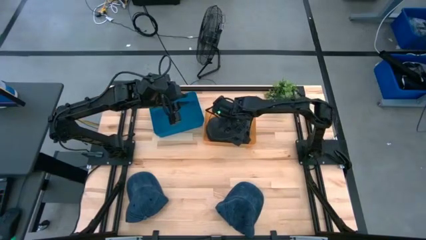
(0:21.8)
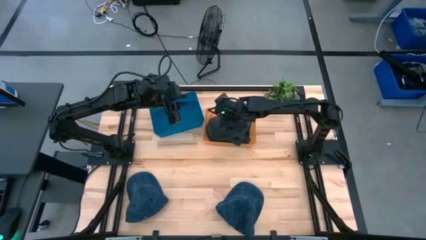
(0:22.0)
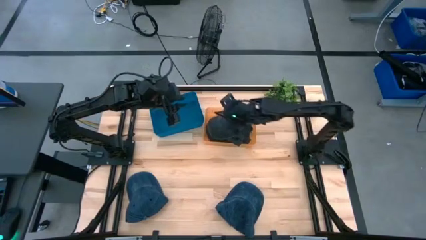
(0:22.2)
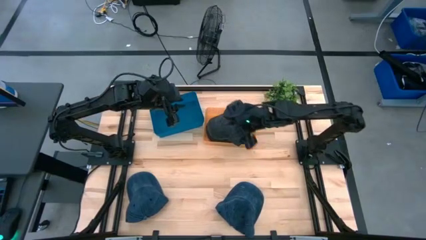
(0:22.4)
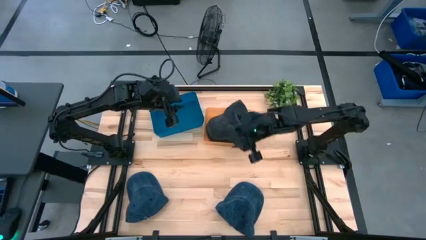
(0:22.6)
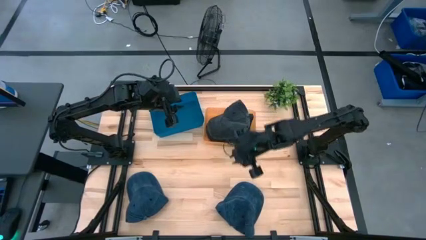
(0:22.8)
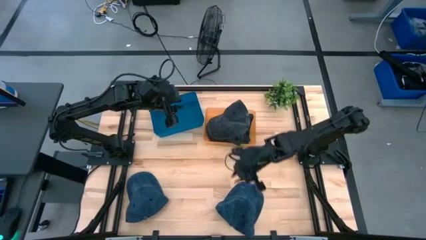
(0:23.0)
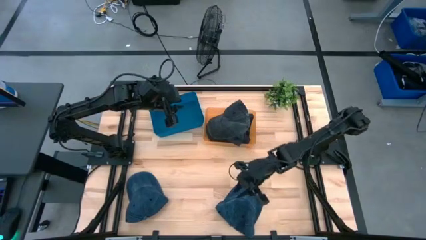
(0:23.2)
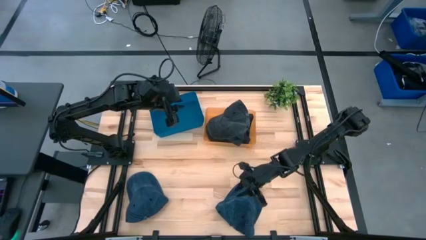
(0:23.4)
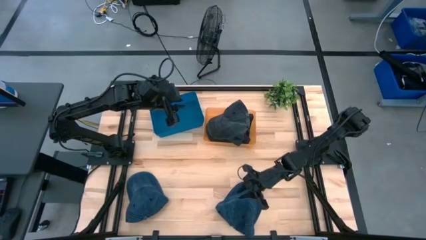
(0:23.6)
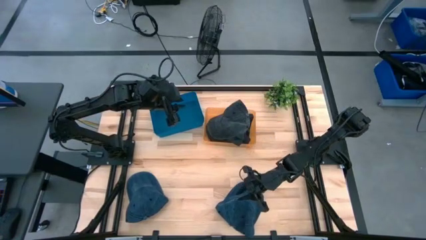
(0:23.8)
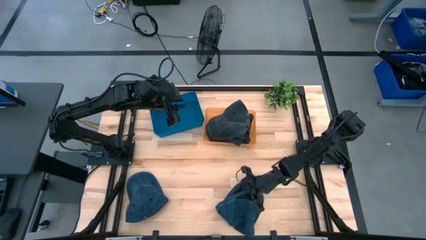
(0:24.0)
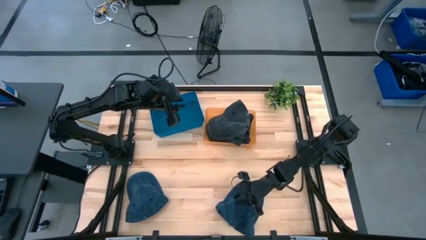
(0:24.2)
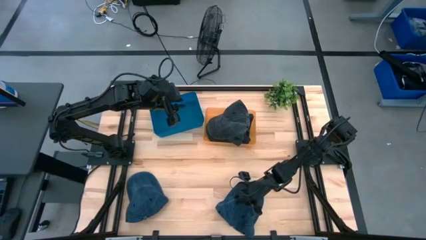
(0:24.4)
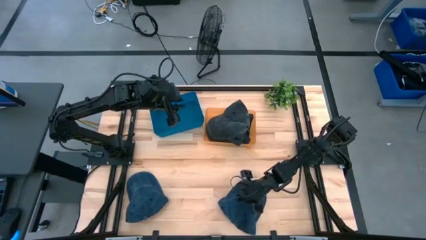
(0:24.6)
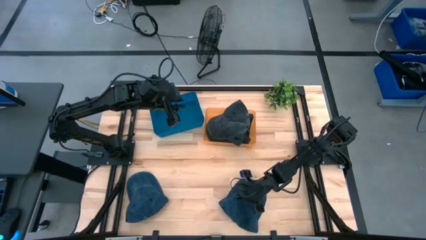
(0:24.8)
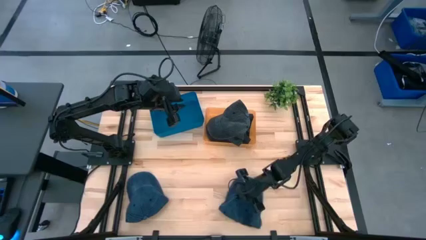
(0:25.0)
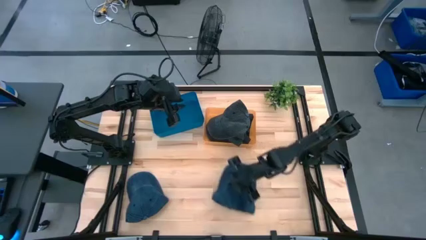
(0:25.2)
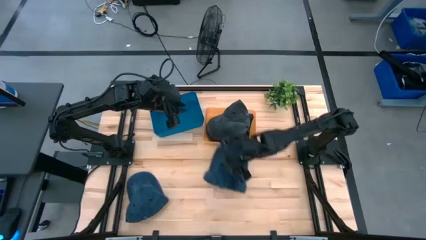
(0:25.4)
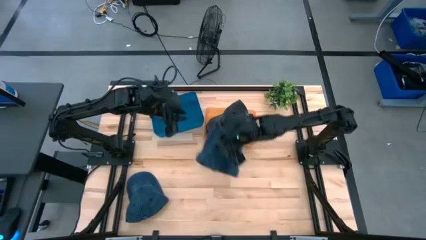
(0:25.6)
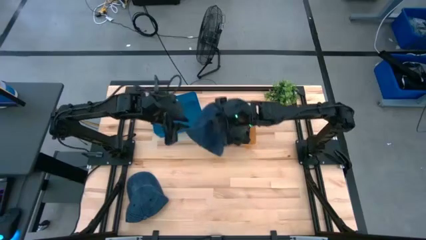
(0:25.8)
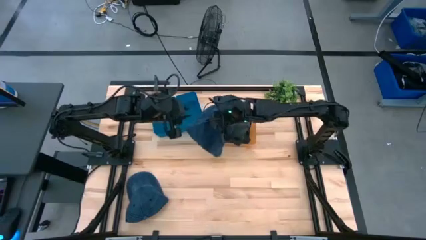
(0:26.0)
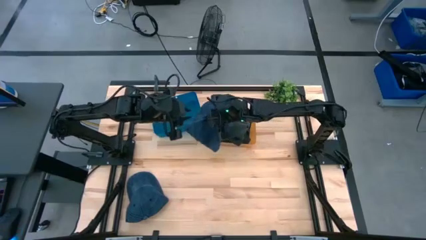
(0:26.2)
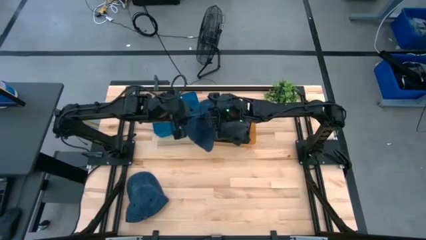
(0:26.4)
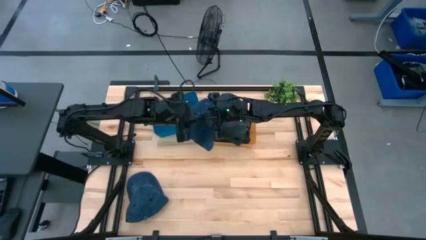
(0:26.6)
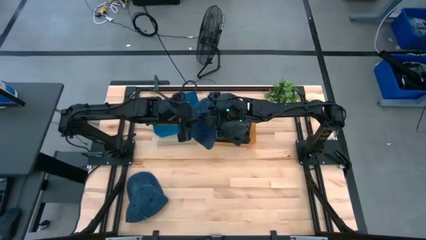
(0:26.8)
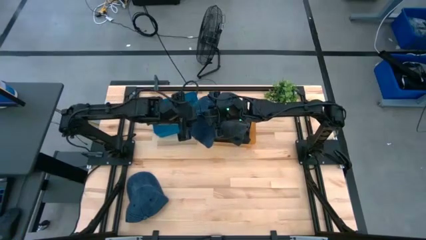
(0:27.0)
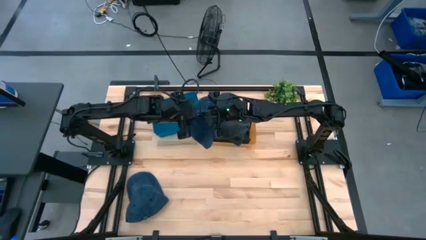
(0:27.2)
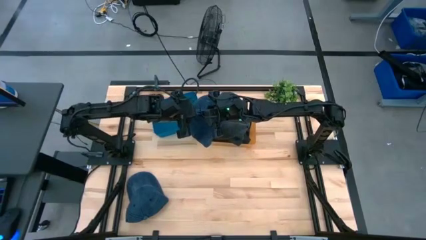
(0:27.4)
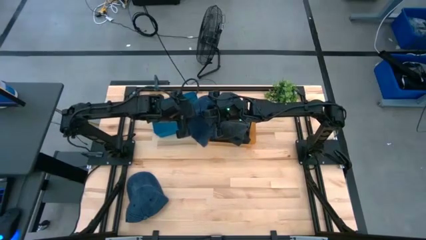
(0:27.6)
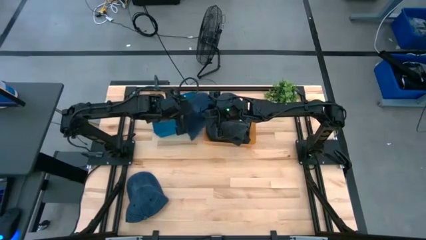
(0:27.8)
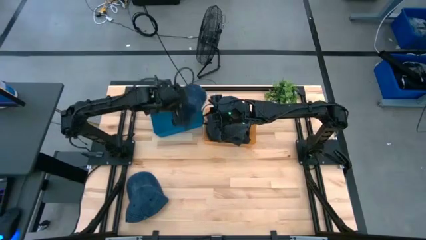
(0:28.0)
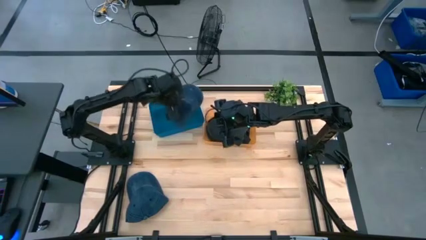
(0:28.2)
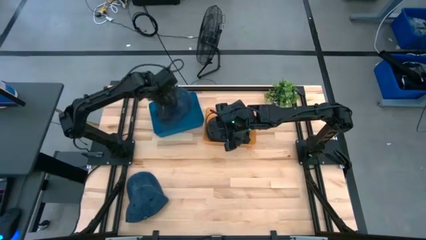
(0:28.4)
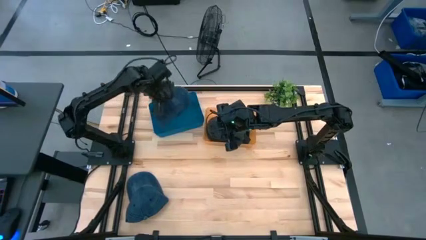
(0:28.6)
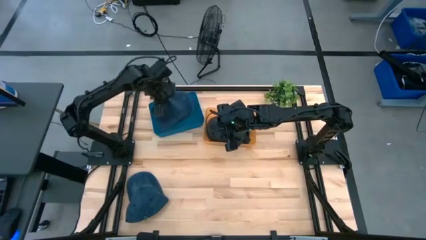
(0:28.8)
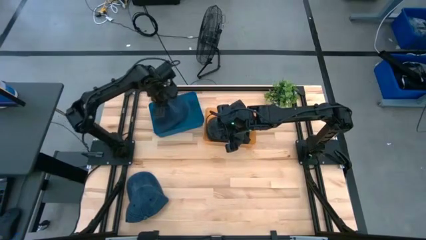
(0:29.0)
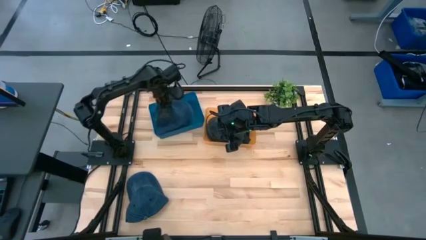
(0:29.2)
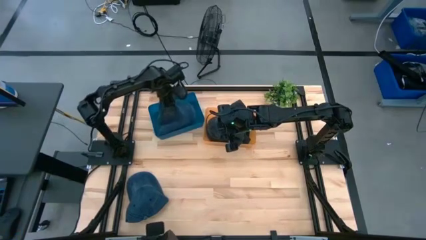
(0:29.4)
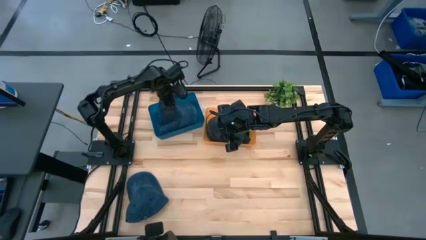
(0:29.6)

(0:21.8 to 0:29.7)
Task: Pick & Place hat
Put the right blue cap into the blue bin

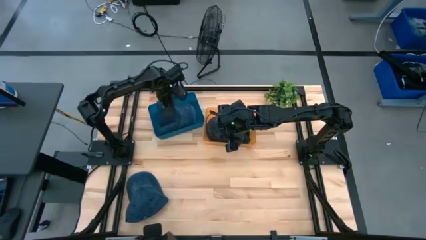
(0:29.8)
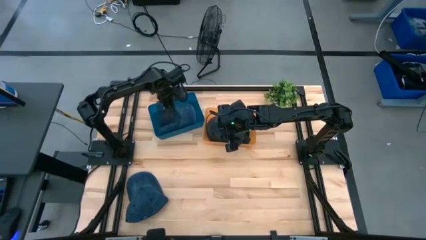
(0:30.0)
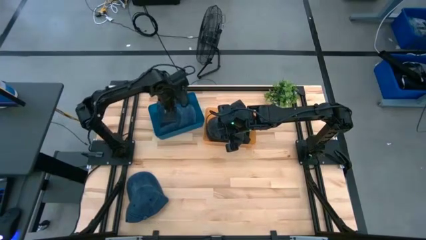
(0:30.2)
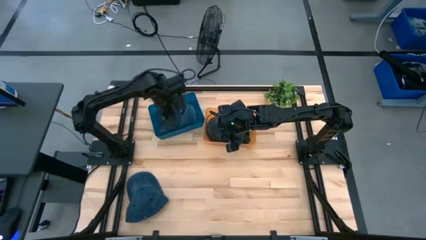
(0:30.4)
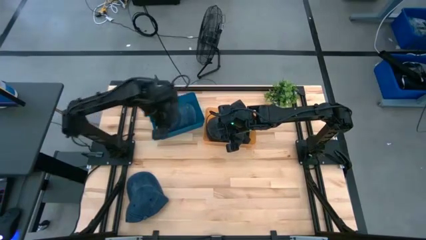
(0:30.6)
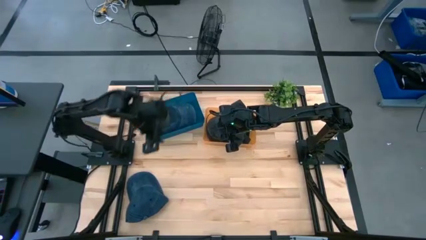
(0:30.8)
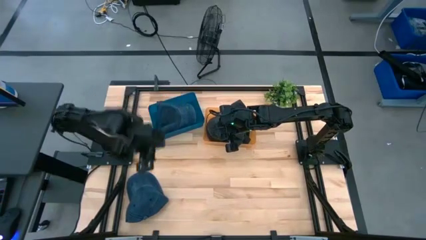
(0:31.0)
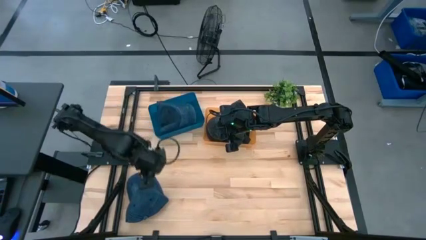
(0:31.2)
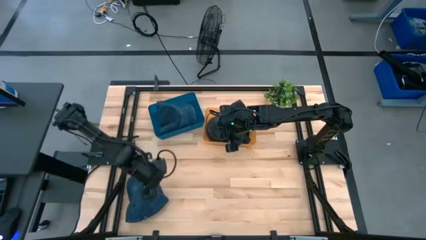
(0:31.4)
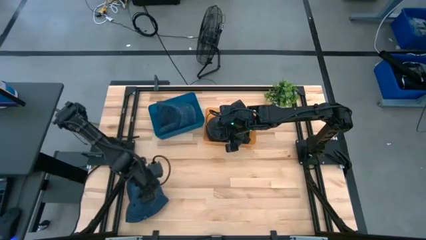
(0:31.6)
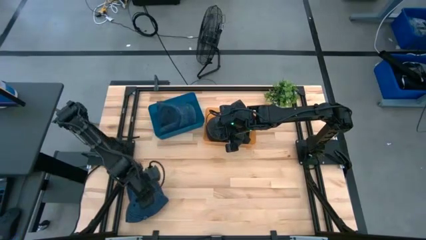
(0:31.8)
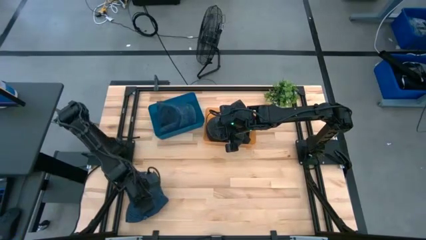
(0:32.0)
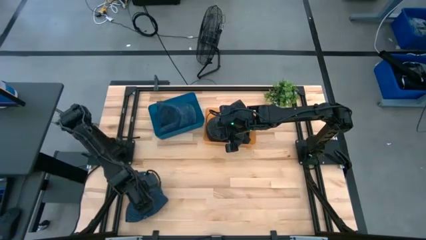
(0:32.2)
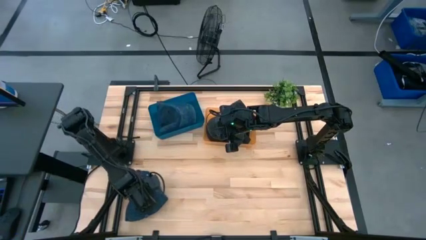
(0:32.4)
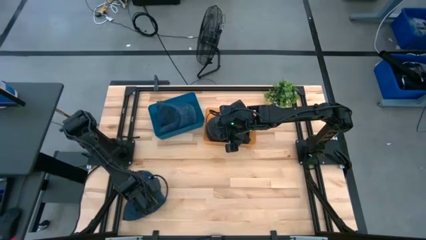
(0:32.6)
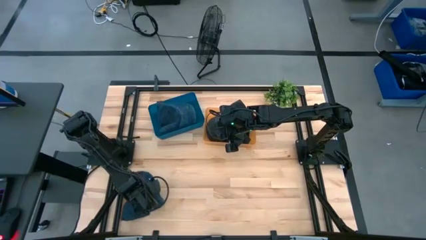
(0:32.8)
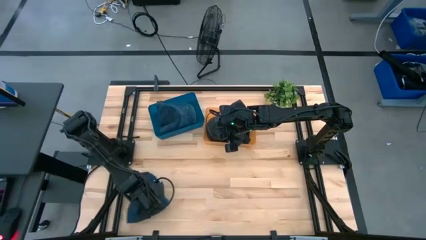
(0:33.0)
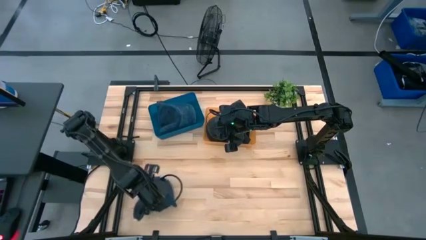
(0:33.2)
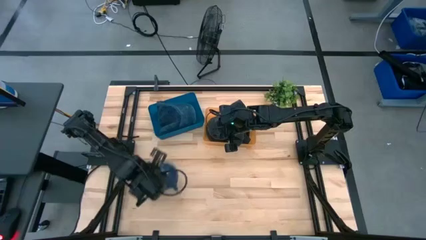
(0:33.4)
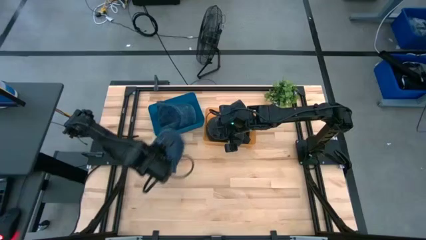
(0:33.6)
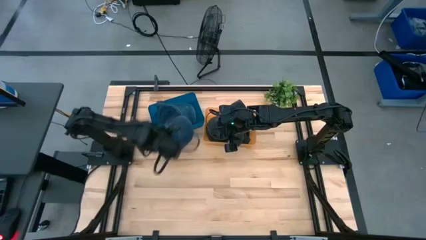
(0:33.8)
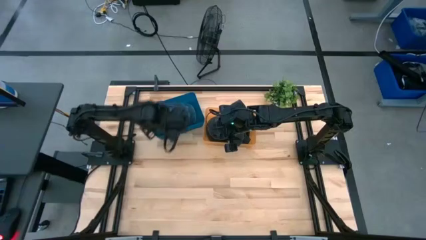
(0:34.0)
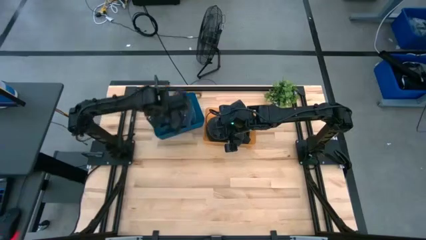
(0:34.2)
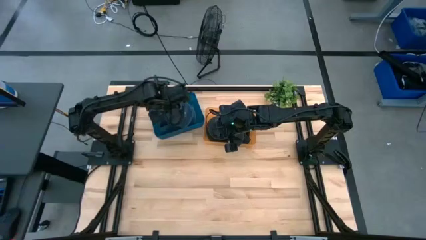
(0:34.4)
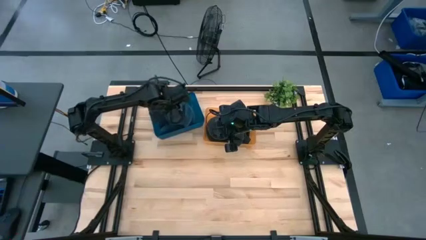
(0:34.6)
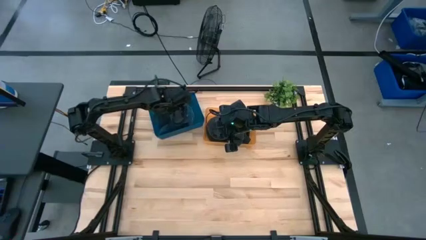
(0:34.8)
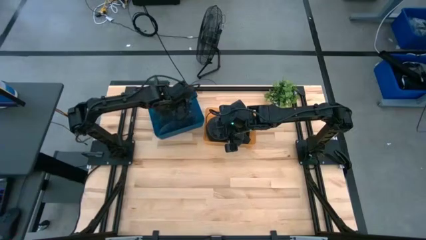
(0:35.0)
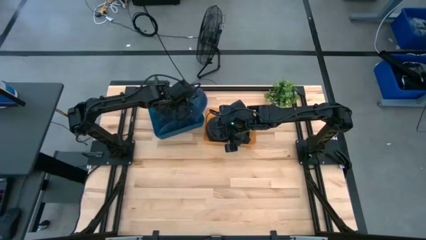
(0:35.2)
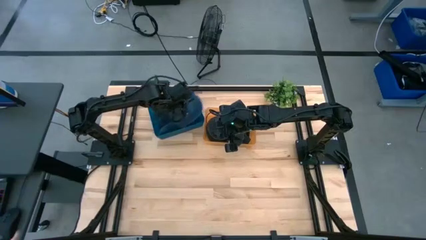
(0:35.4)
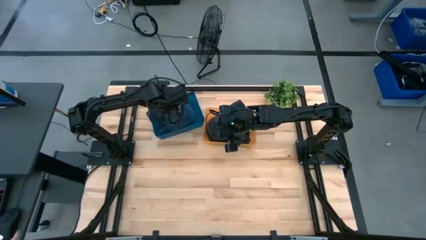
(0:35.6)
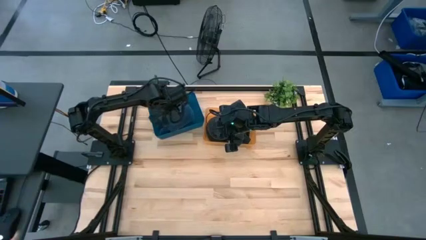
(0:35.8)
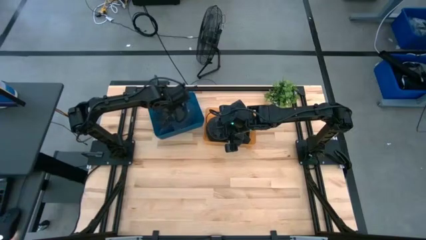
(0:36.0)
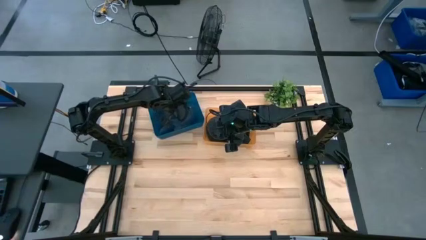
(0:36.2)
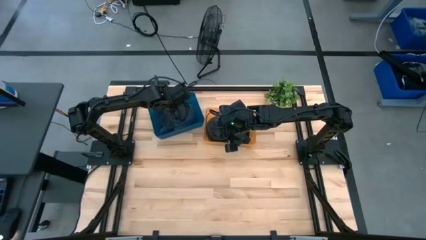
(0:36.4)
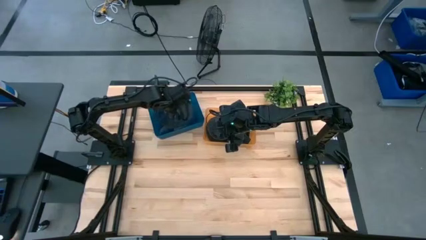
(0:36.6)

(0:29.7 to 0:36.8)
Put the blue cap into the blue bin

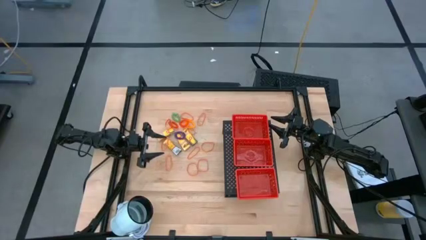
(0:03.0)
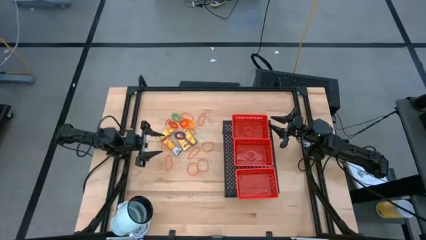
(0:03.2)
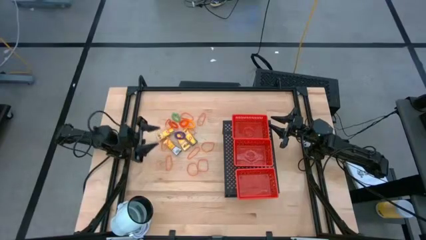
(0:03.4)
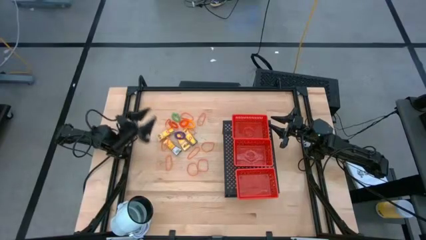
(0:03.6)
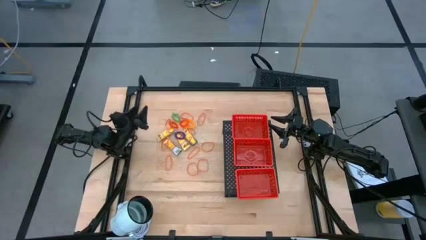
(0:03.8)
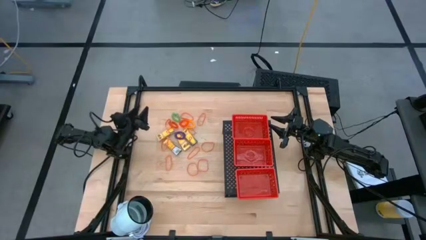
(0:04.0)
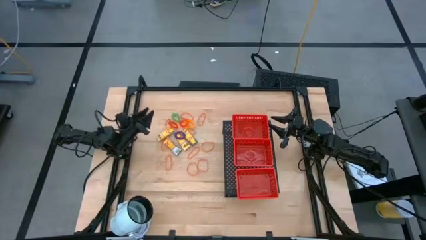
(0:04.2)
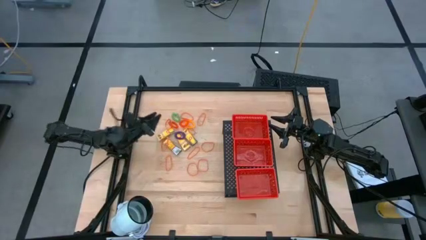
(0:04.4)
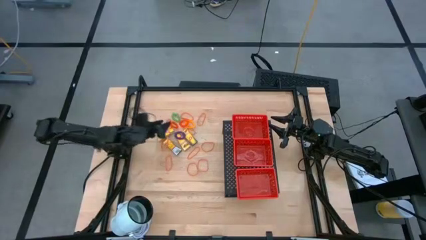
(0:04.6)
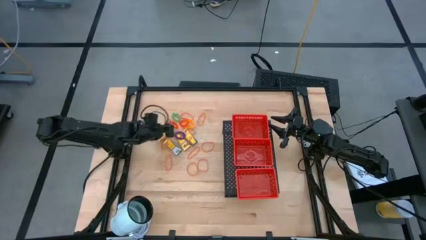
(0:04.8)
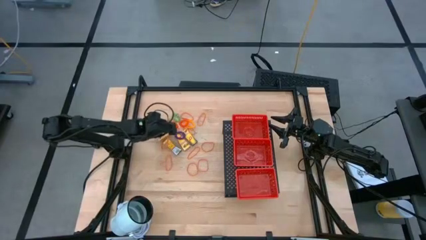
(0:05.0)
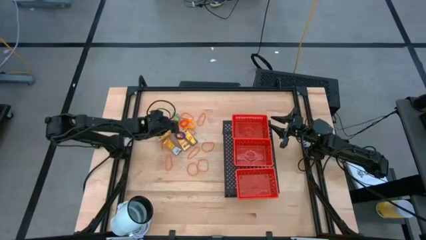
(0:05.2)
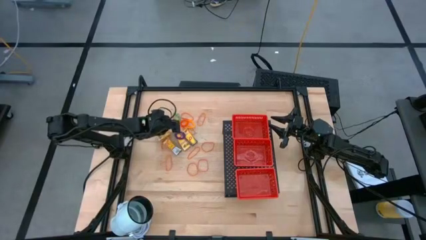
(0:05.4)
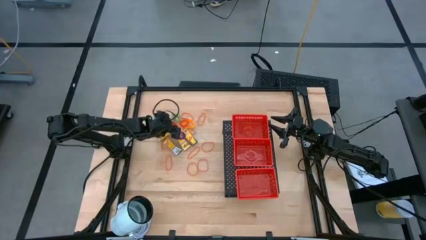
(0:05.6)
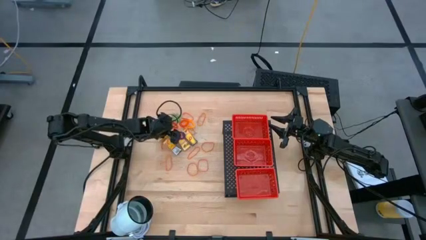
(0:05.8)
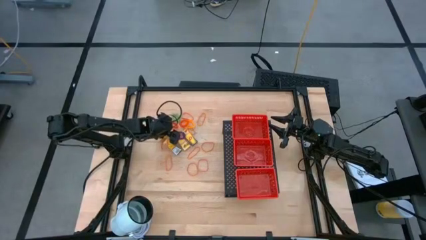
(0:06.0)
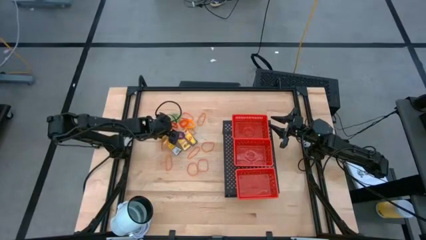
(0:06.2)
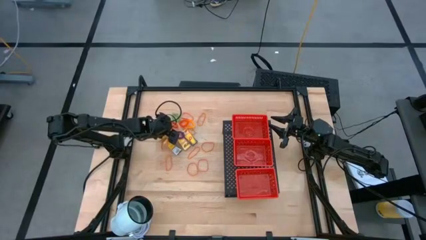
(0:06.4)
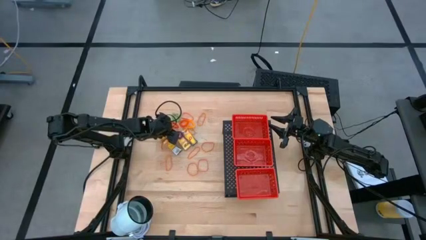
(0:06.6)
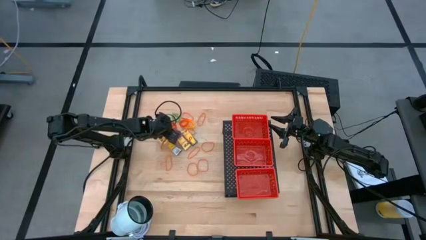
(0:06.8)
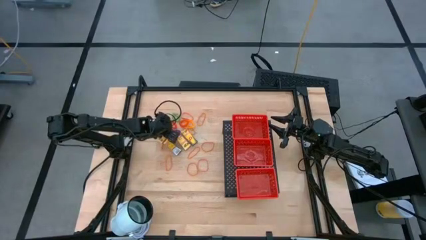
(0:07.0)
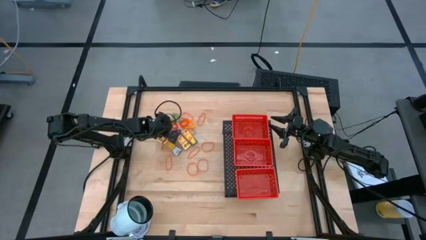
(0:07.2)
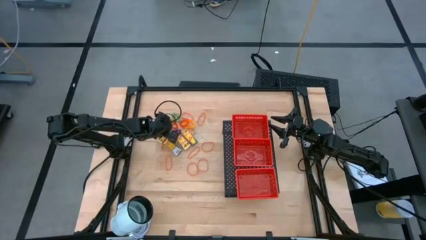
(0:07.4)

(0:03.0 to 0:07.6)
Task: Pick & Place Office Desk Supplies
Put the orange rubber band into the top red bin on the shelf
